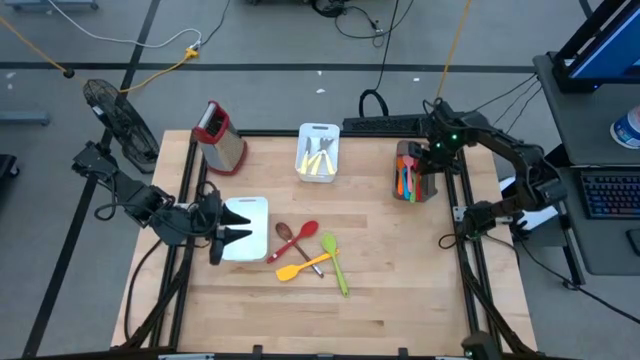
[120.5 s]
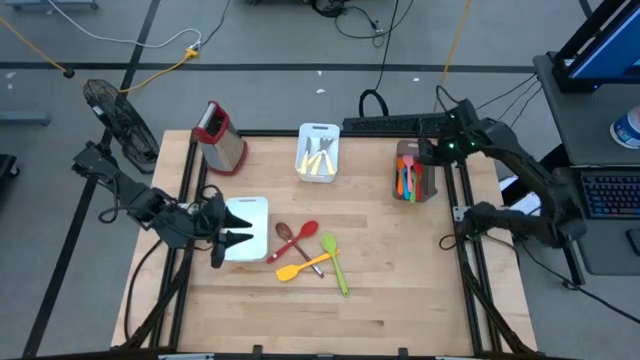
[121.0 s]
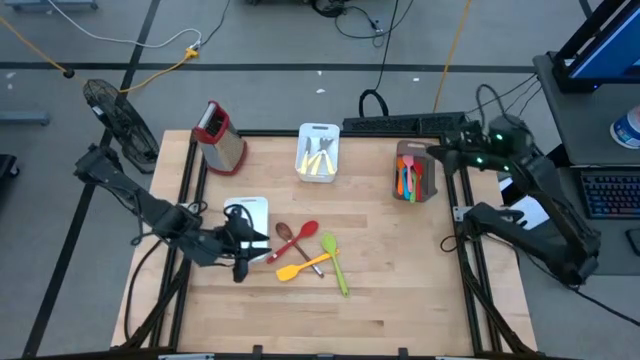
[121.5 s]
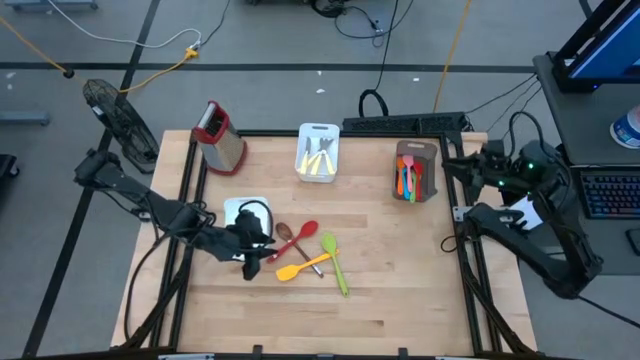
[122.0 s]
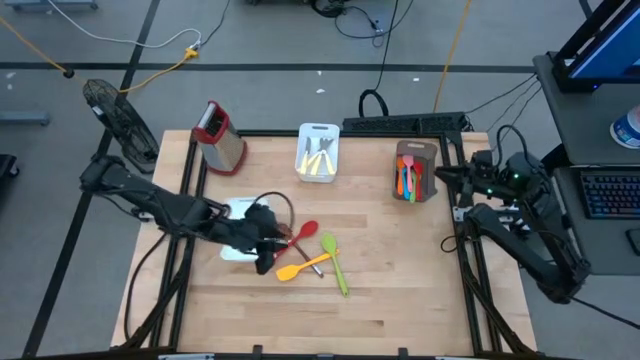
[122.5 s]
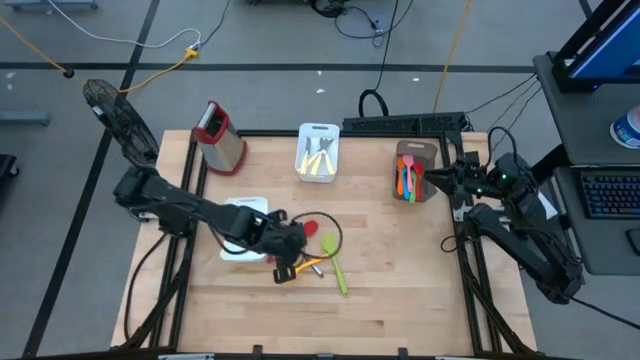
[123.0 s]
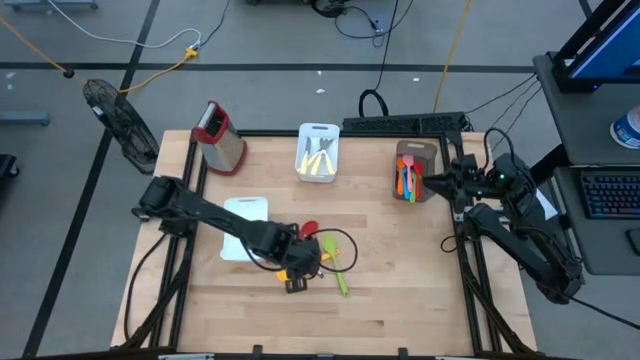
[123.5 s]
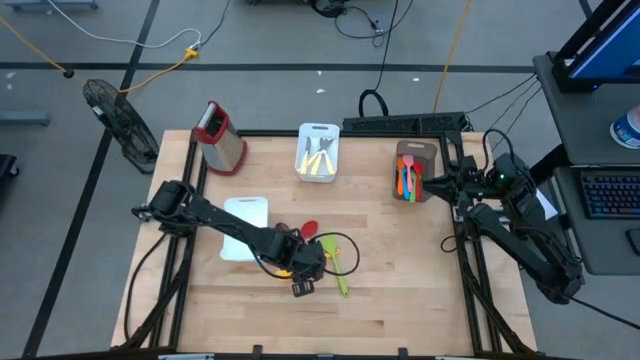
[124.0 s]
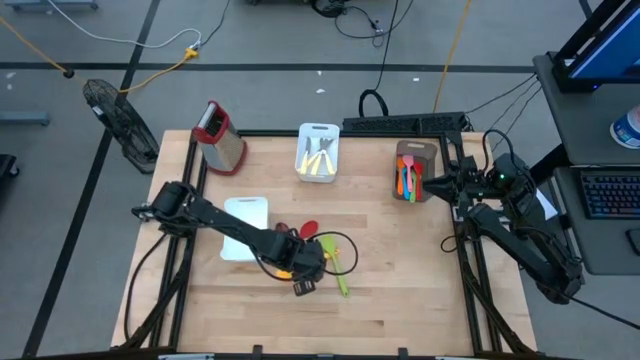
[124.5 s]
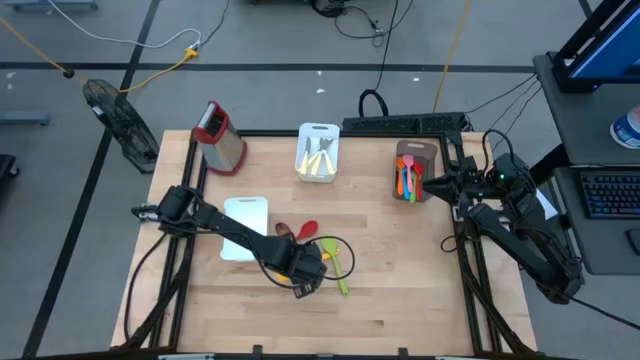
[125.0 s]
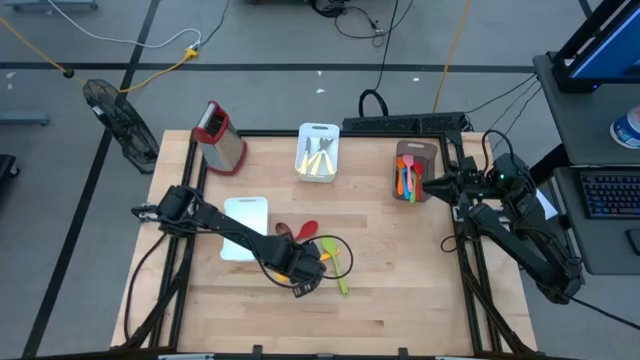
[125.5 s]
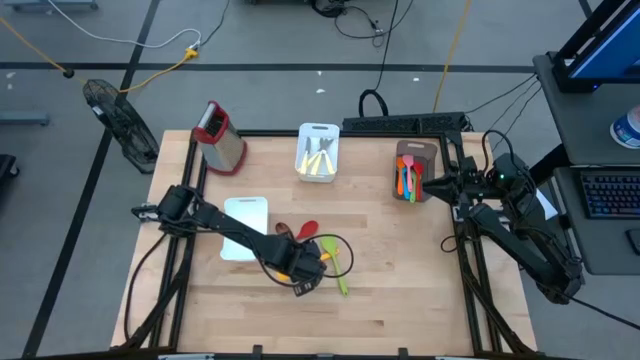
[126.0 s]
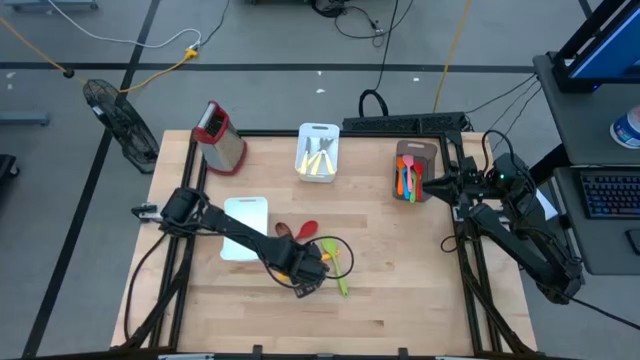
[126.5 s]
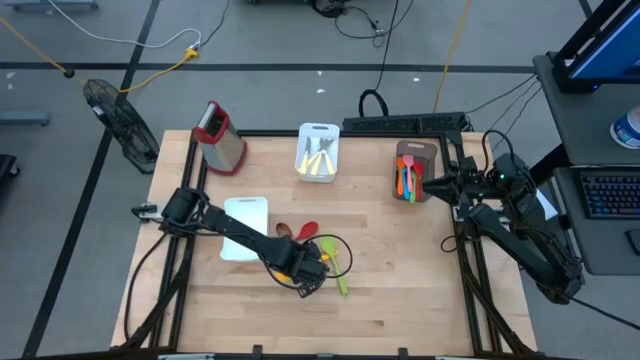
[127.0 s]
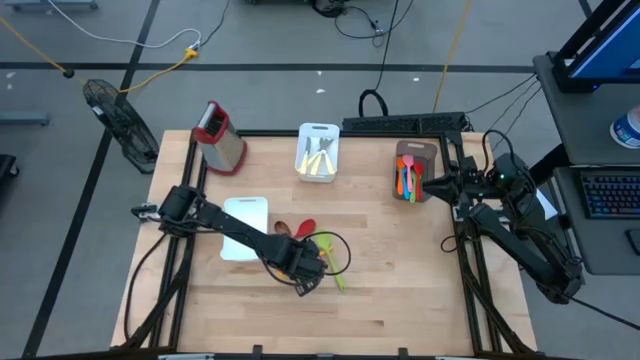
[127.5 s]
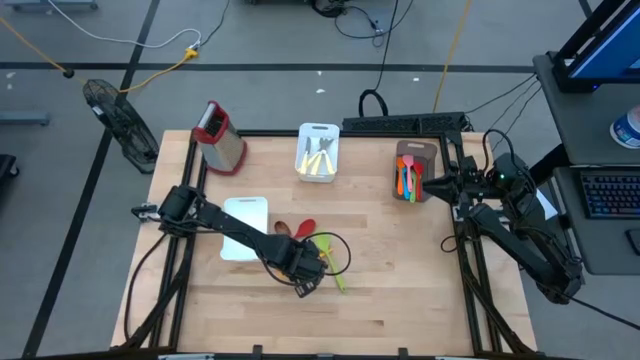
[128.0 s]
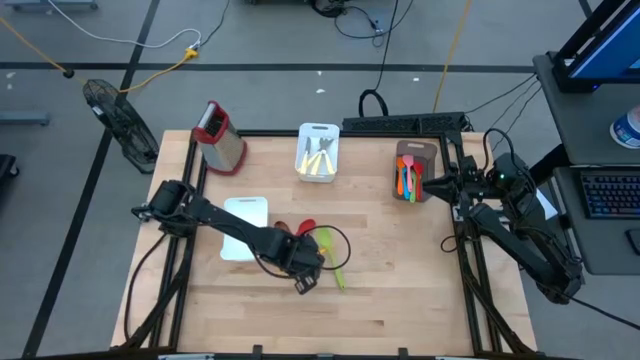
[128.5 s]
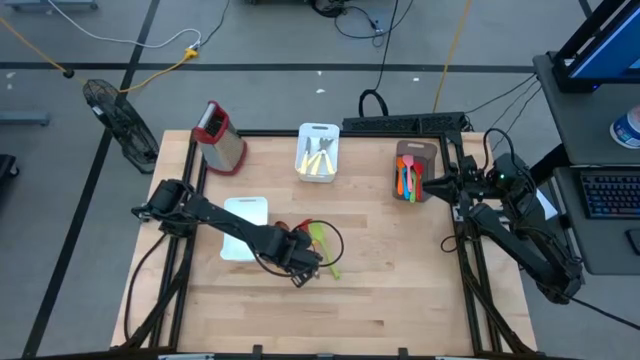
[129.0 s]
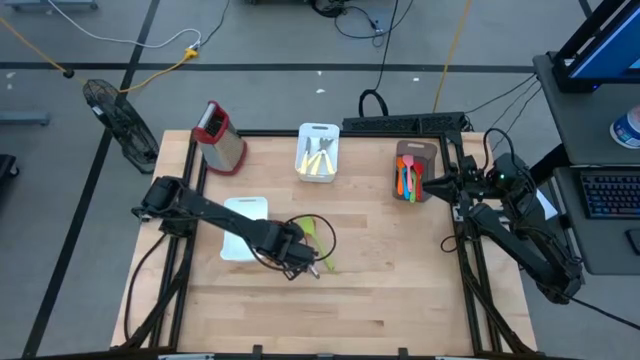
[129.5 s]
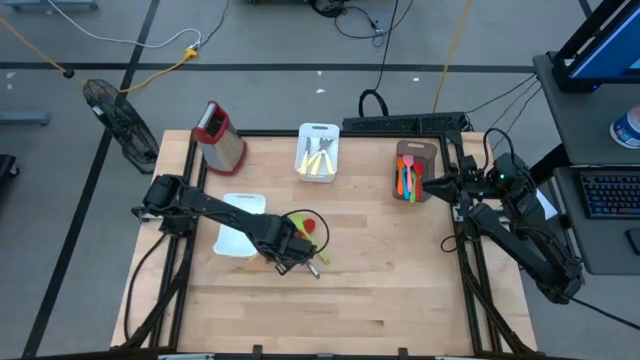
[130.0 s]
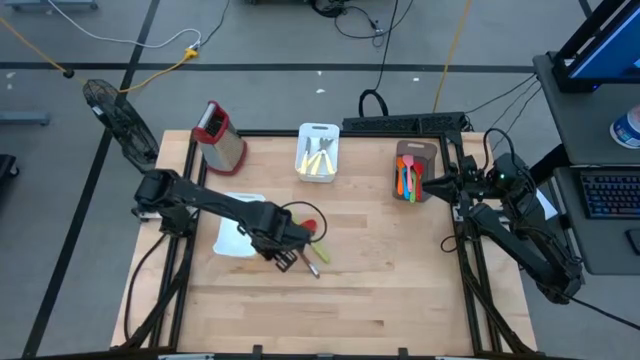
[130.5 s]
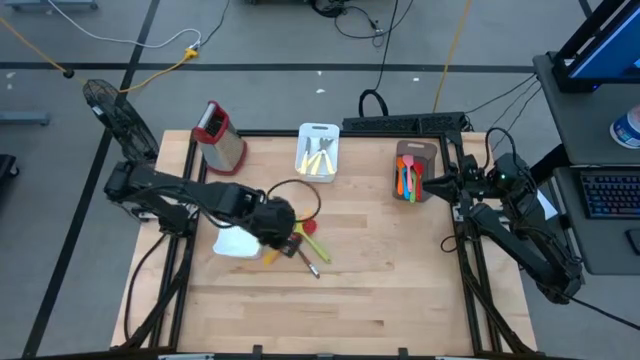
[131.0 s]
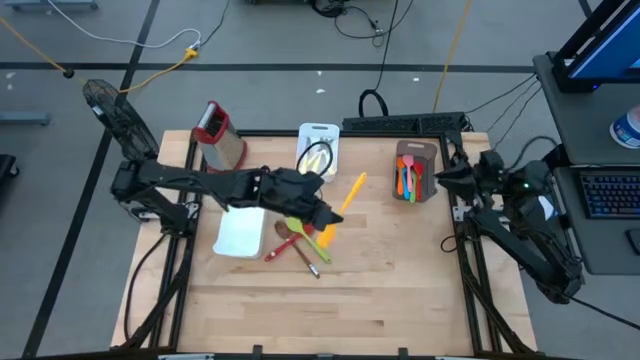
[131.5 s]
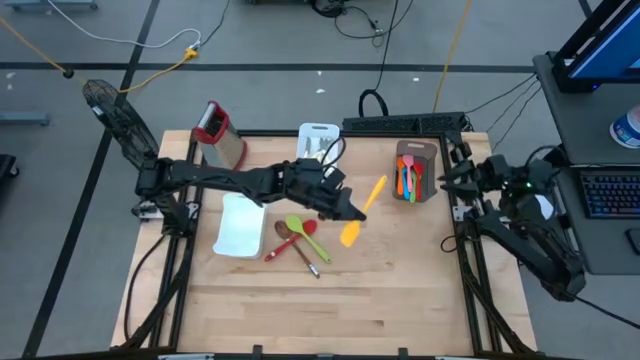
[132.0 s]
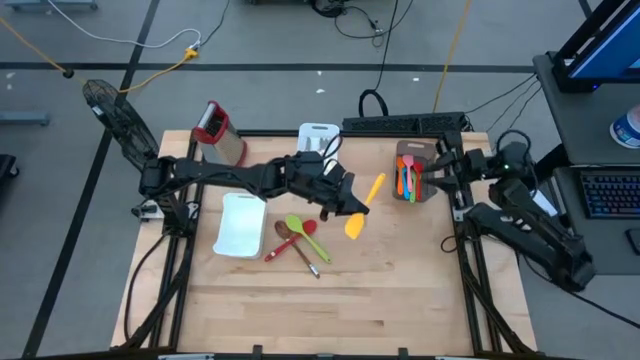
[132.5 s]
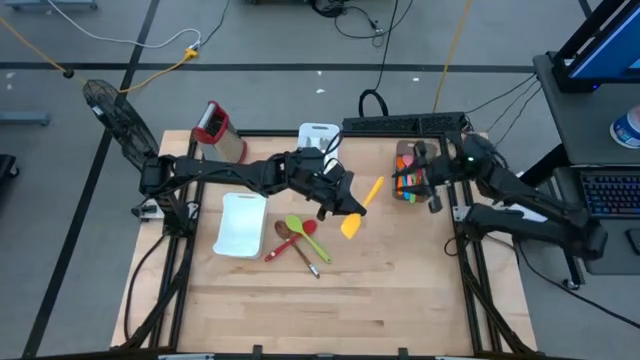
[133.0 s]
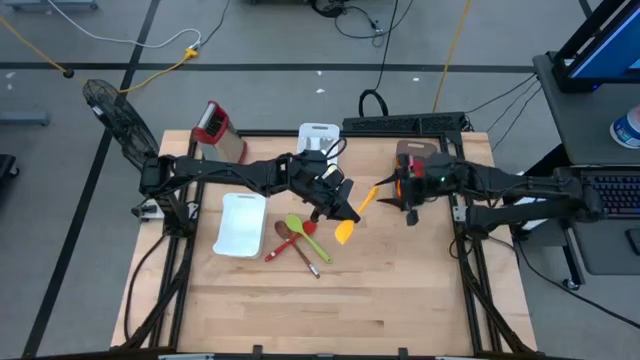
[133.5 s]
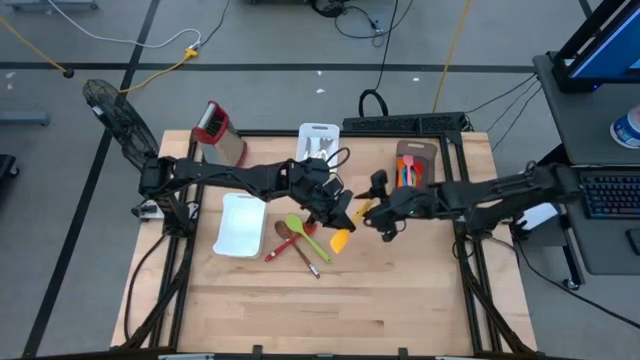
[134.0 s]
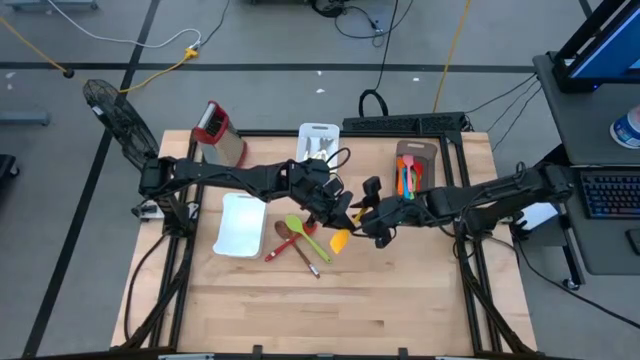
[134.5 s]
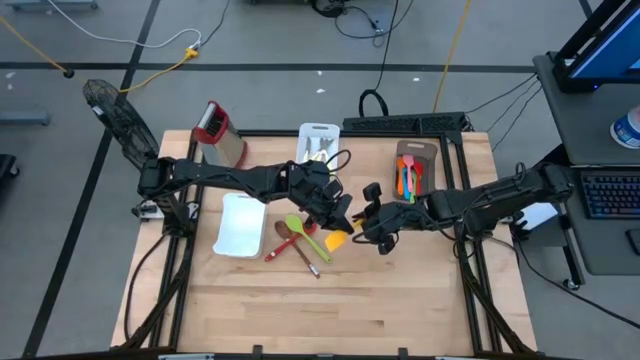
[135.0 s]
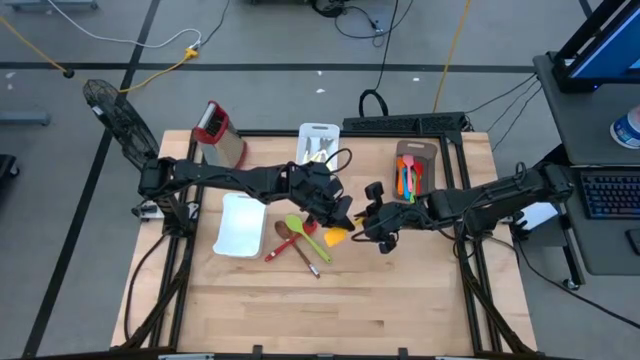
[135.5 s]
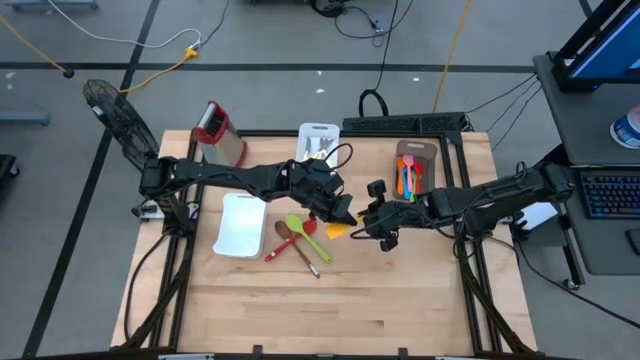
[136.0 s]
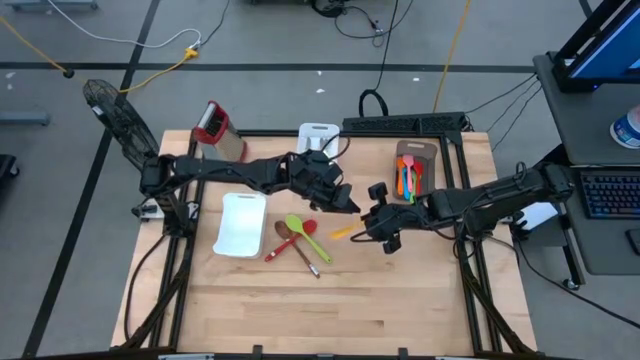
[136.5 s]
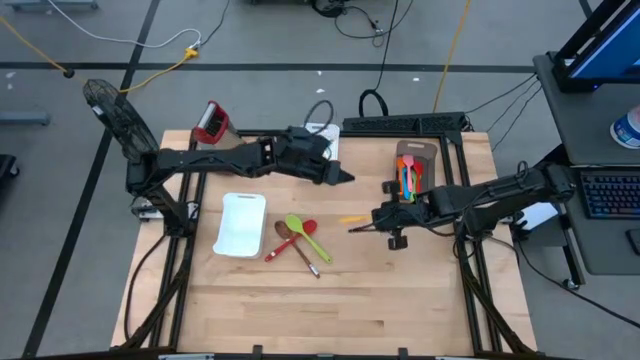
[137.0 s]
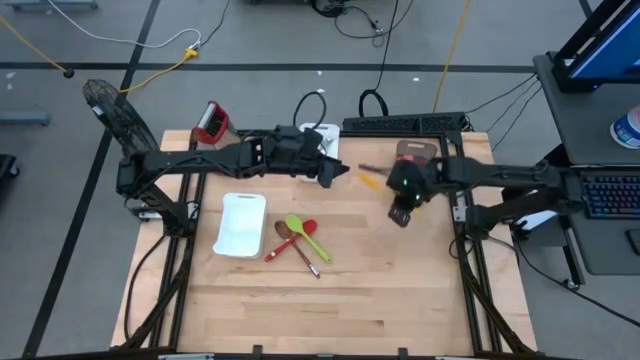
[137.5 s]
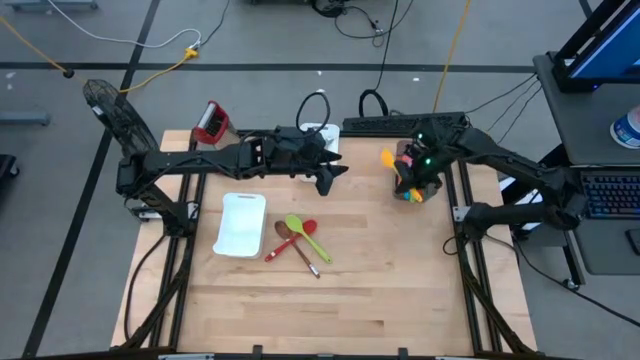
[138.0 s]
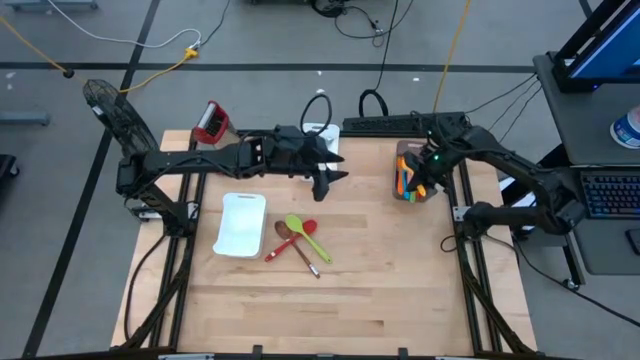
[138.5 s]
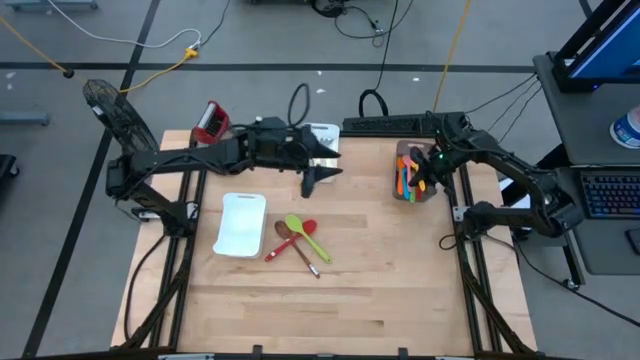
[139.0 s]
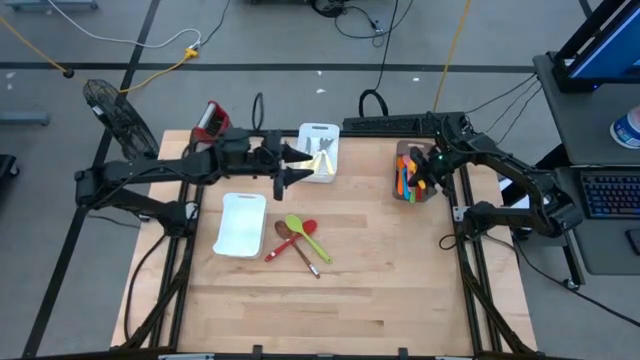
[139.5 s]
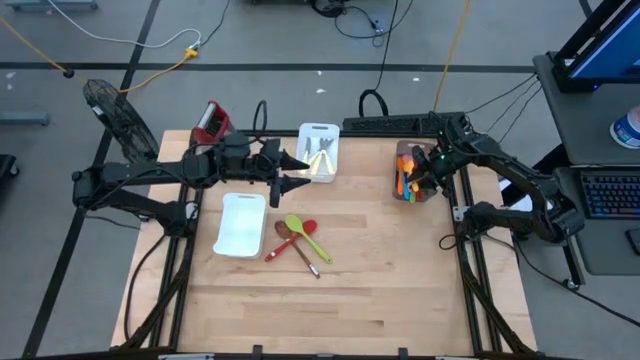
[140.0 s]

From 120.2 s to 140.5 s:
Task: Pick & Place Kitchen Items
Put the yellow spatula into the black bin

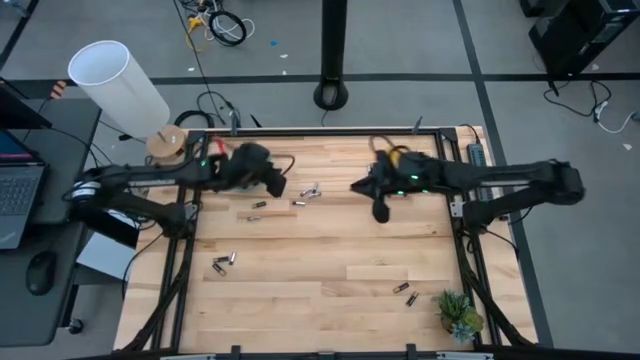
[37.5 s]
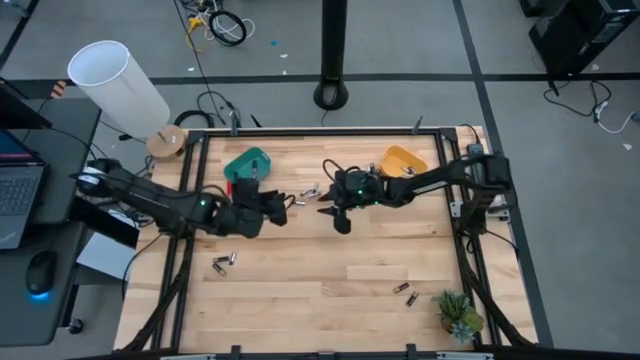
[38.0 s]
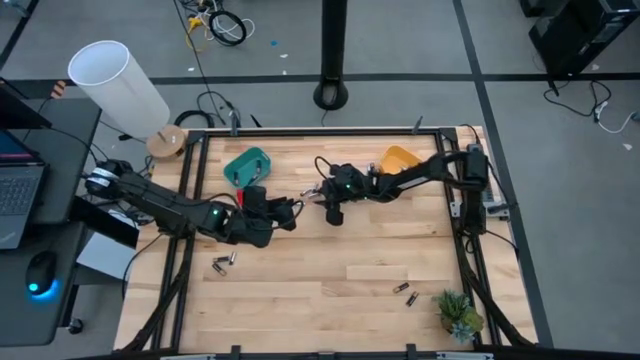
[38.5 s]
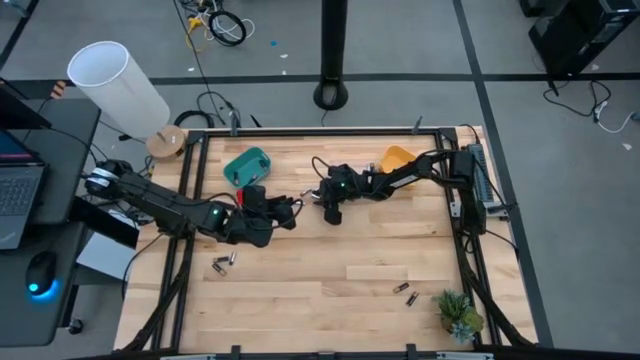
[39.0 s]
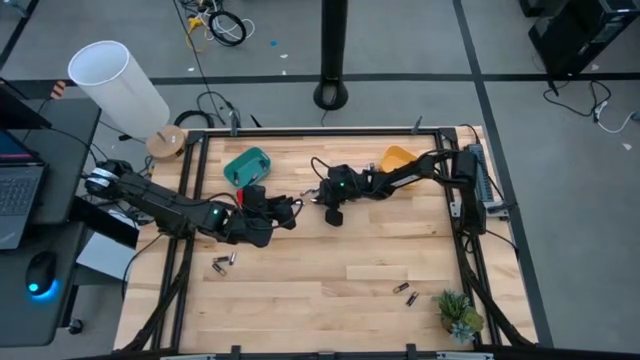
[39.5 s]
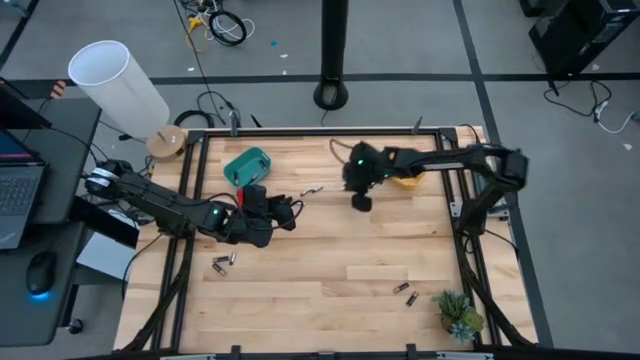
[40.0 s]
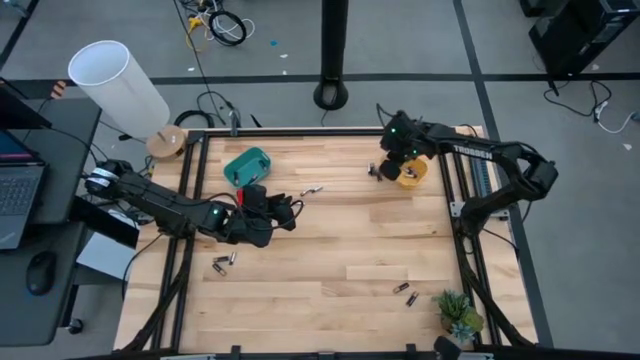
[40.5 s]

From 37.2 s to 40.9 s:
Task: Sort batteries
Put the silver battery into the yellow bin
